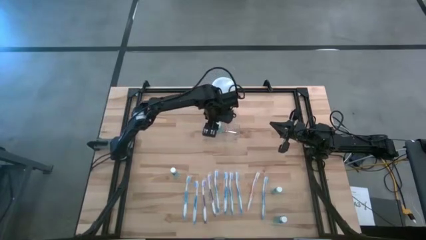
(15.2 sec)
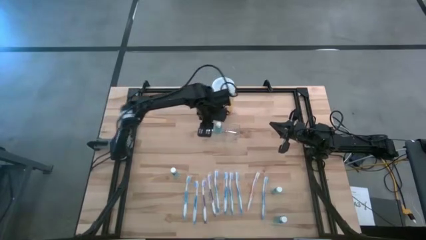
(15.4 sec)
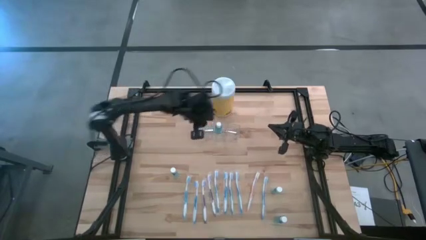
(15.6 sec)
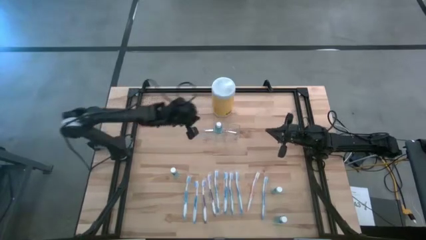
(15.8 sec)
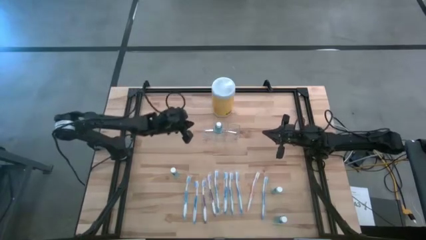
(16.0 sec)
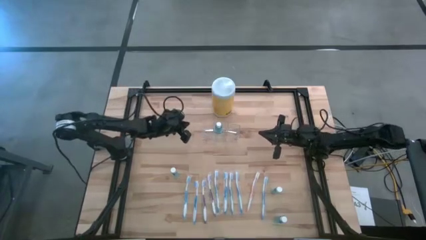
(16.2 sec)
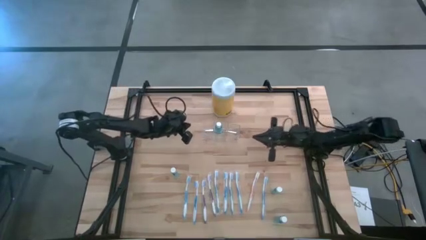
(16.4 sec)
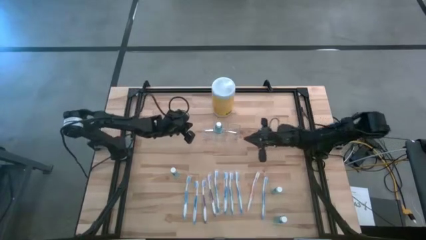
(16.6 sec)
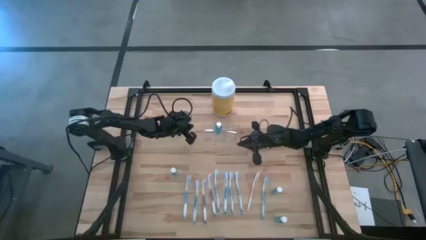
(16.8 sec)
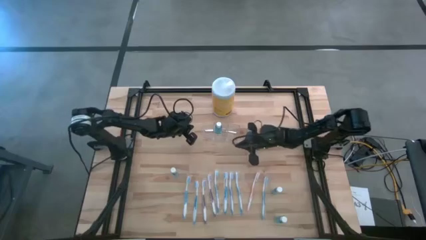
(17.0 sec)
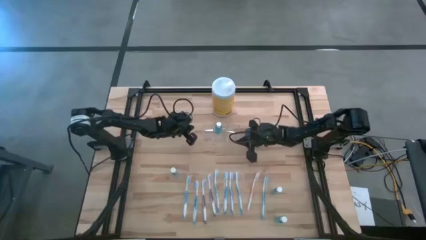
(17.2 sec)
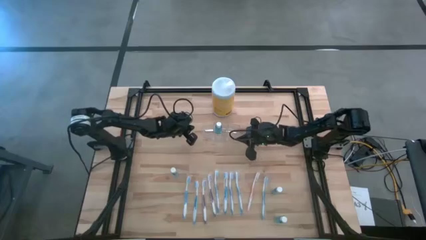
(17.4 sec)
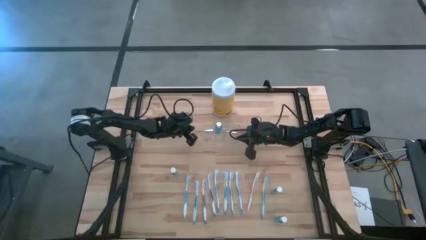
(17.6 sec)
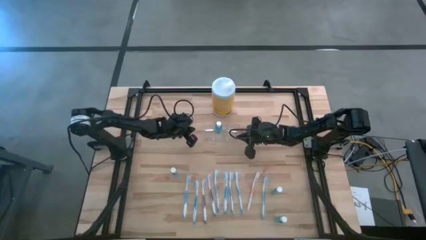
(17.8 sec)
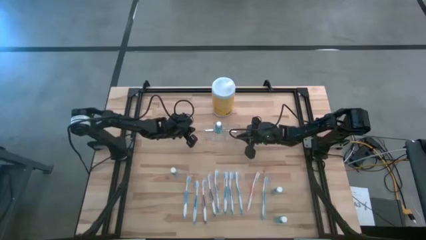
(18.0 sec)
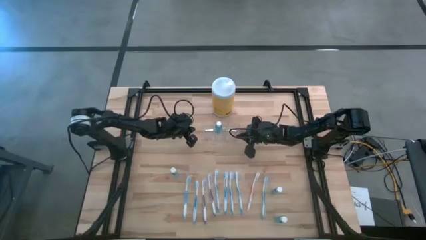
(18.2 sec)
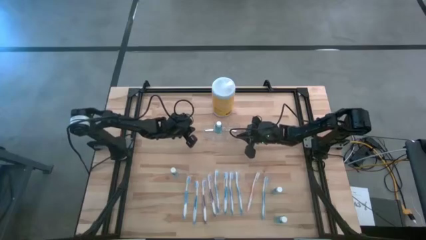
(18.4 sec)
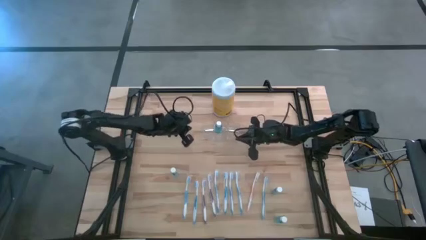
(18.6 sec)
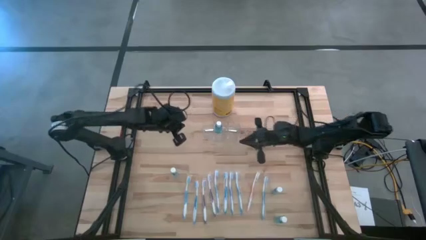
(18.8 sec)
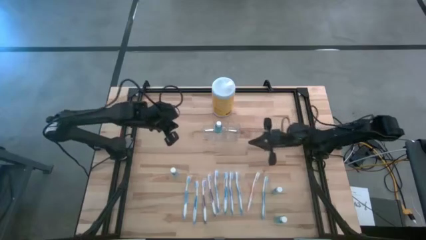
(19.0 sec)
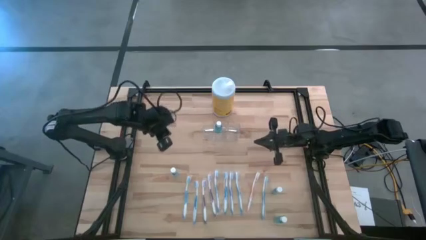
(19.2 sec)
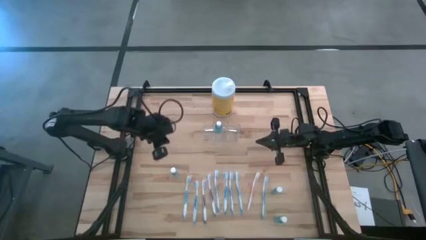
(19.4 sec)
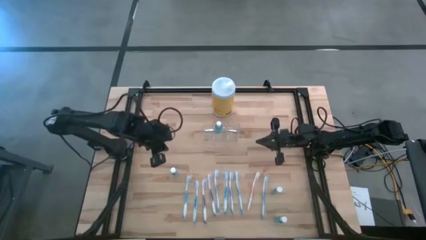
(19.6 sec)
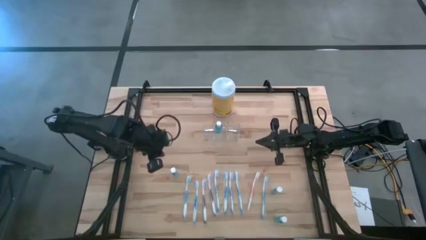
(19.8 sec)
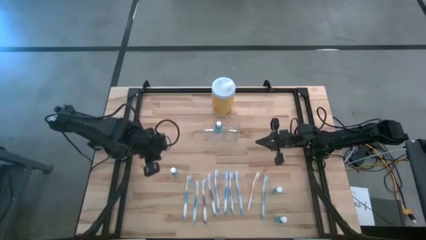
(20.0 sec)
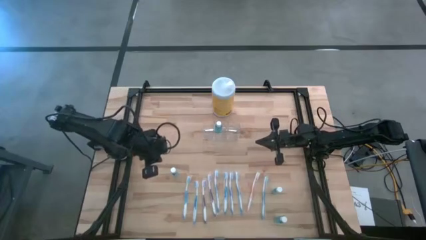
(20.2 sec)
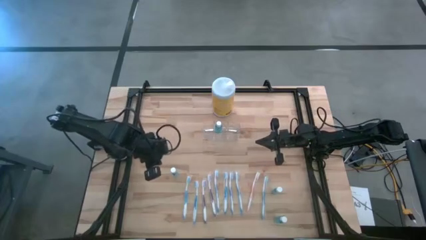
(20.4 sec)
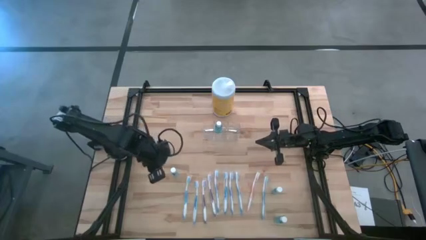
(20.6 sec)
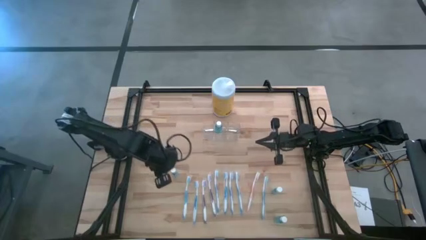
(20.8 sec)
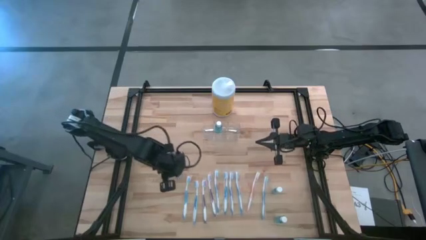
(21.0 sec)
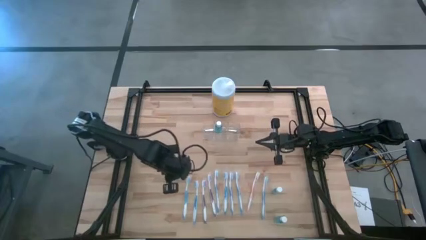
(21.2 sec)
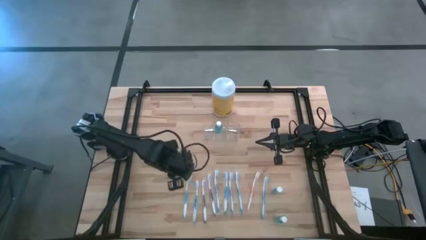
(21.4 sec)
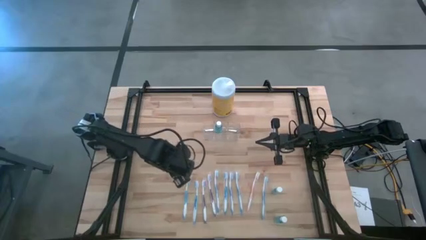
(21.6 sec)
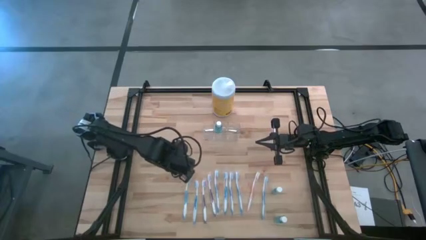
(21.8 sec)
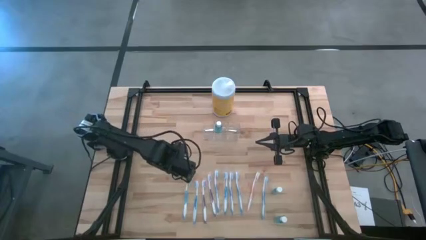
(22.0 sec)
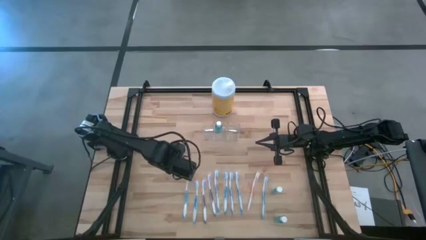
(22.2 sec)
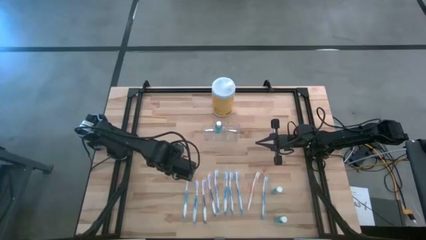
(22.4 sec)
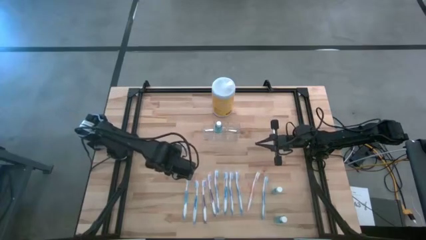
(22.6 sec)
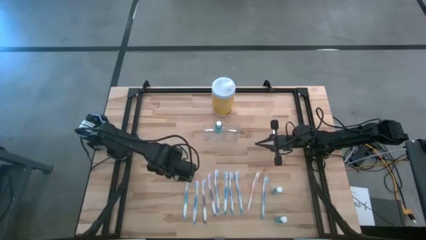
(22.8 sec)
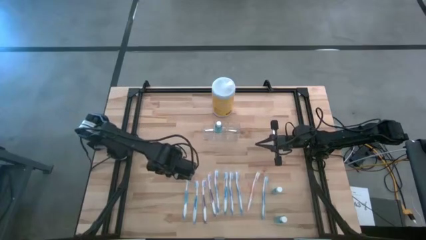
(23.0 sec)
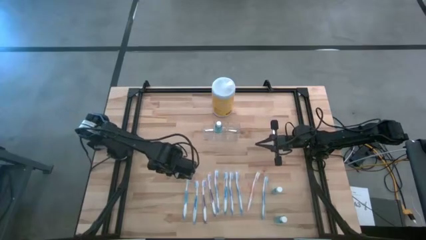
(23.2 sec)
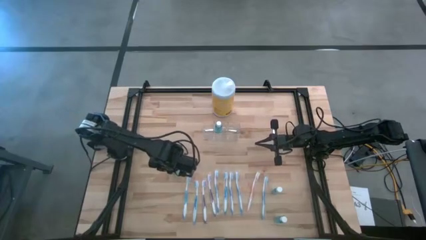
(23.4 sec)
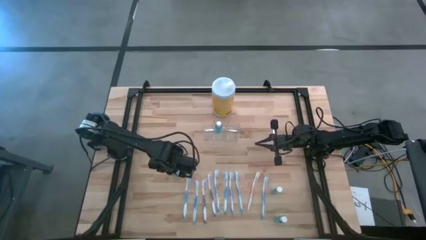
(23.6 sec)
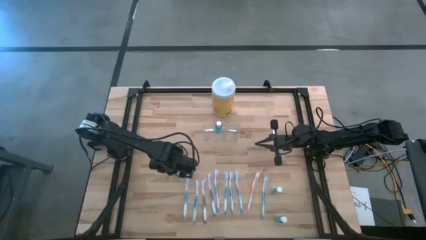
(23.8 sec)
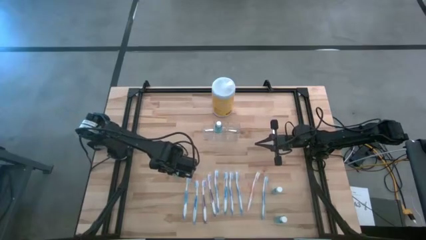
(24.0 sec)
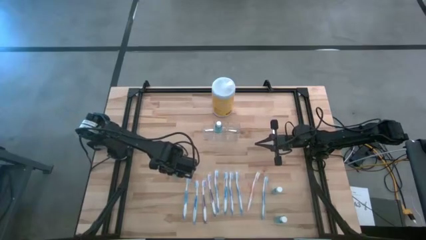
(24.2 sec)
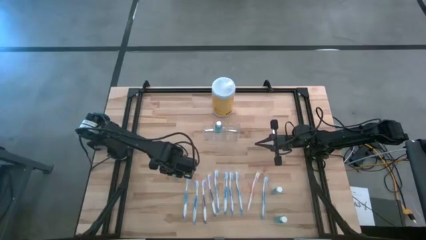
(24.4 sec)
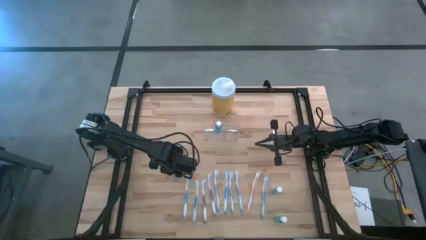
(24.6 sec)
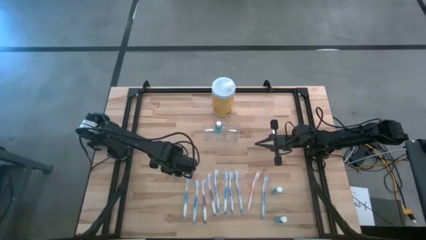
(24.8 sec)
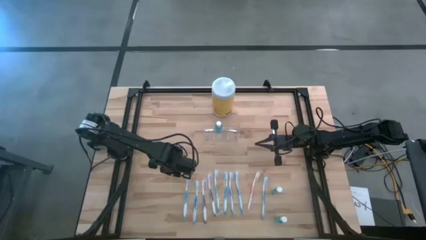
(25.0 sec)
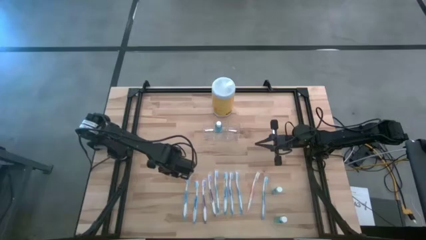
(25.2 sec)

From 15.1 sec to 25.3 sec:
Task: Pick & Place toothbrushing station
Put the blue mouthwash into the transparent organizer
